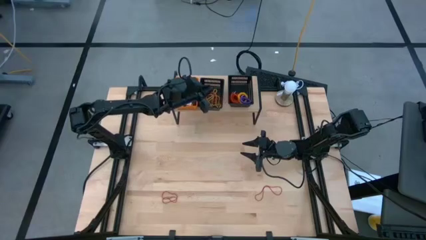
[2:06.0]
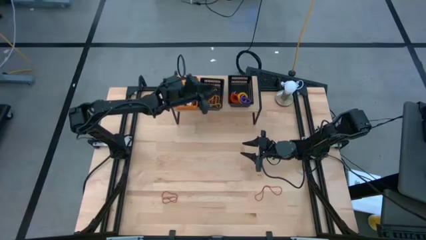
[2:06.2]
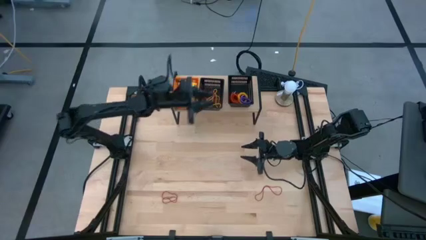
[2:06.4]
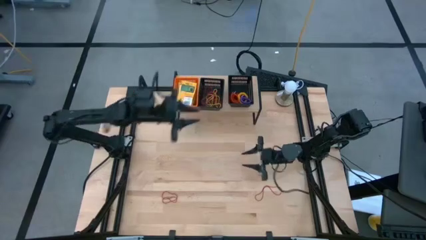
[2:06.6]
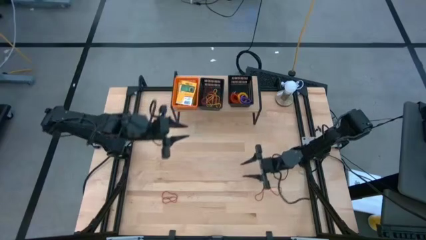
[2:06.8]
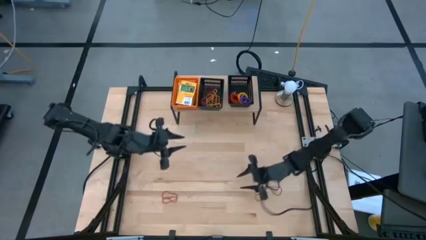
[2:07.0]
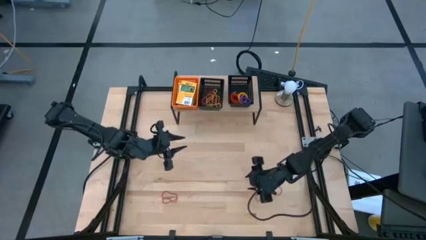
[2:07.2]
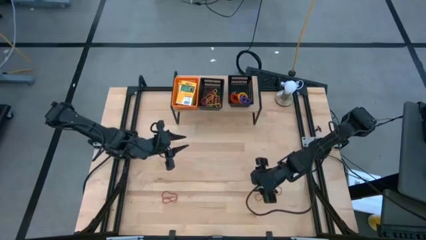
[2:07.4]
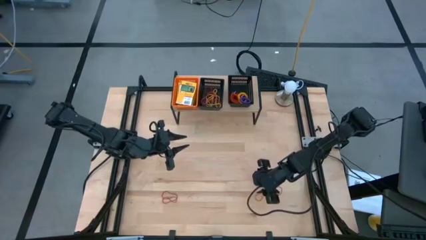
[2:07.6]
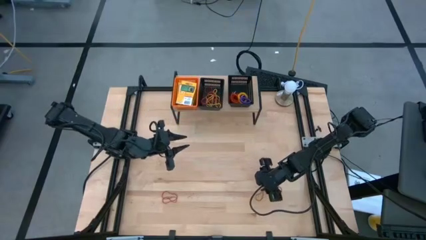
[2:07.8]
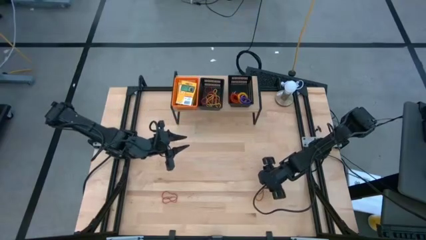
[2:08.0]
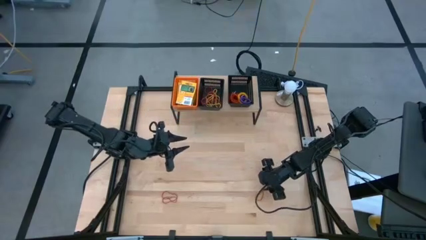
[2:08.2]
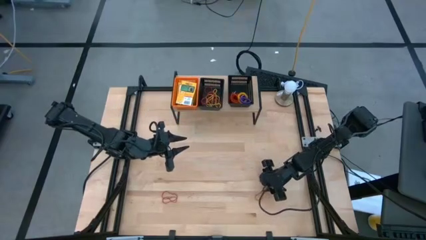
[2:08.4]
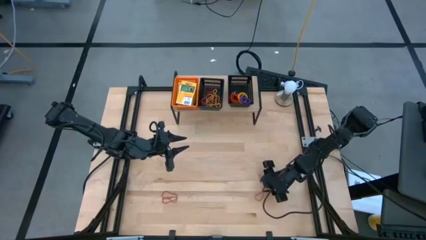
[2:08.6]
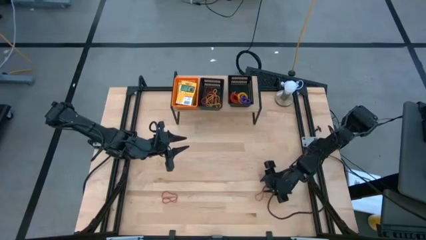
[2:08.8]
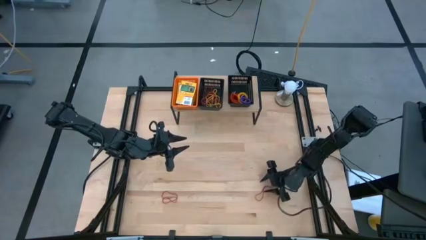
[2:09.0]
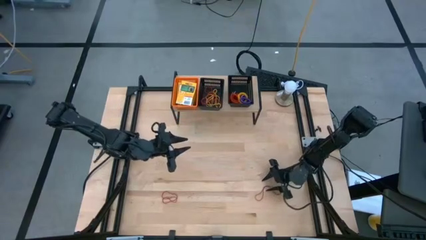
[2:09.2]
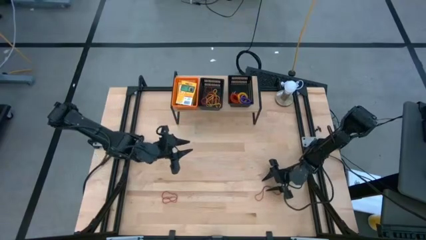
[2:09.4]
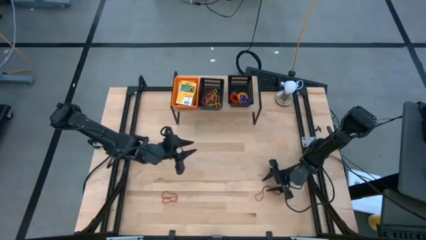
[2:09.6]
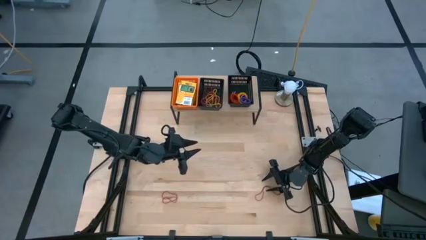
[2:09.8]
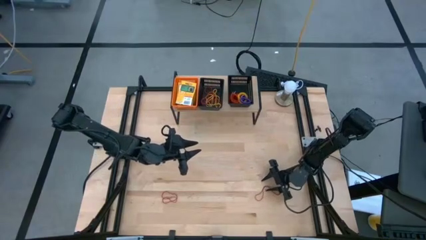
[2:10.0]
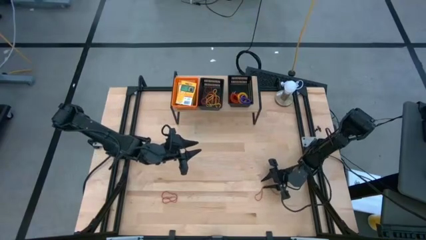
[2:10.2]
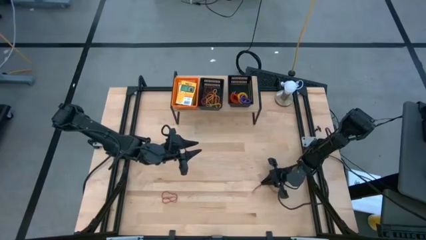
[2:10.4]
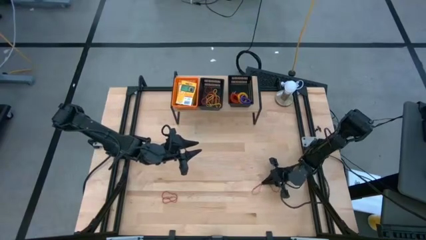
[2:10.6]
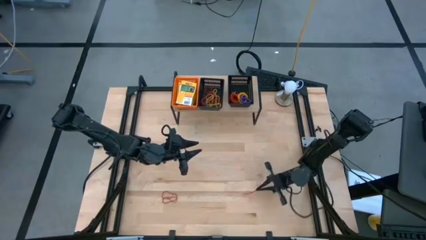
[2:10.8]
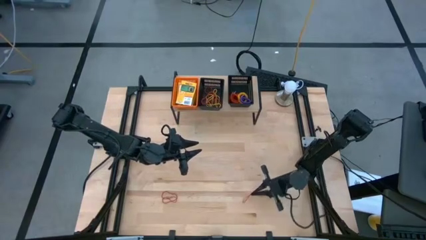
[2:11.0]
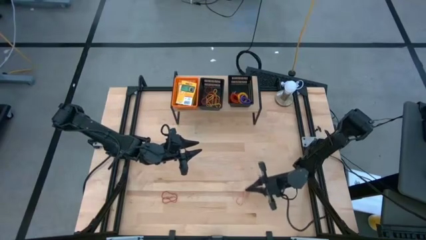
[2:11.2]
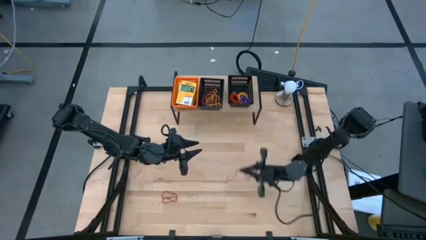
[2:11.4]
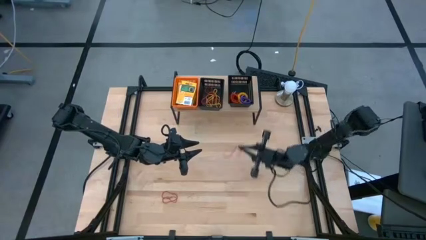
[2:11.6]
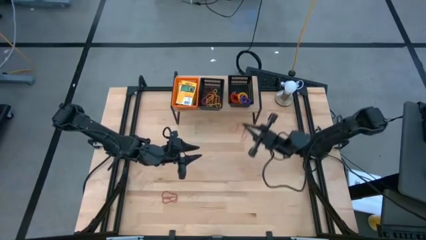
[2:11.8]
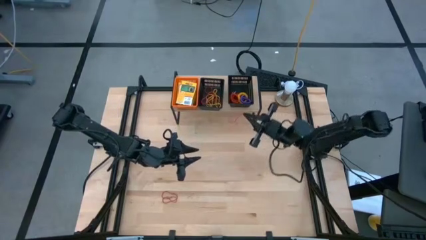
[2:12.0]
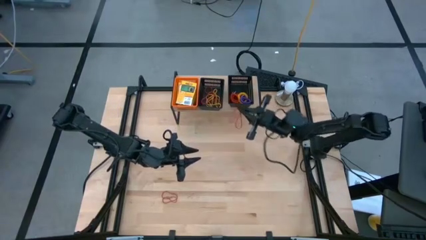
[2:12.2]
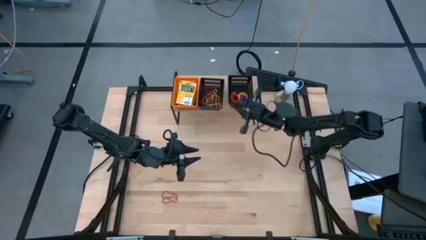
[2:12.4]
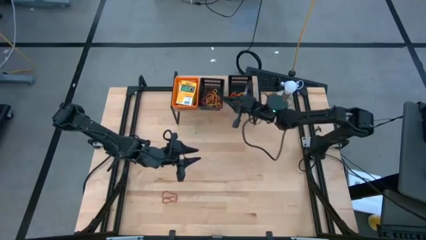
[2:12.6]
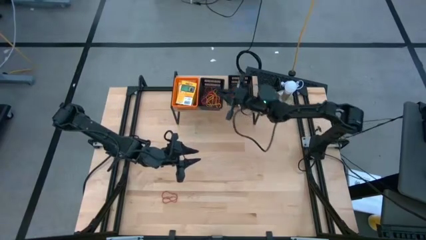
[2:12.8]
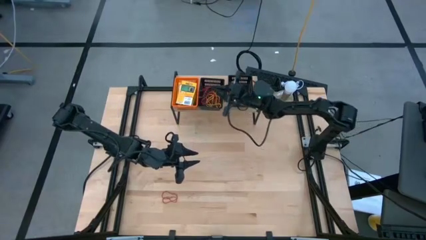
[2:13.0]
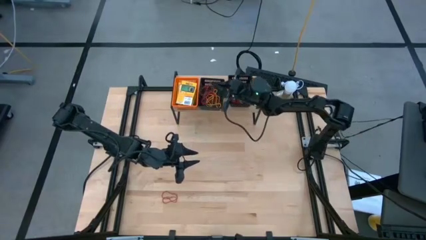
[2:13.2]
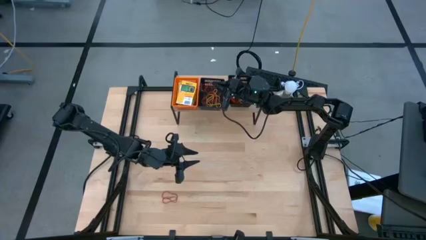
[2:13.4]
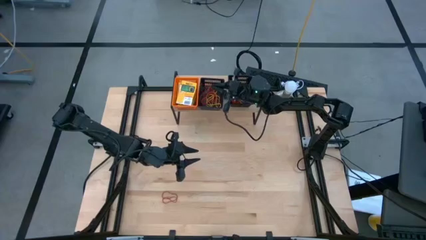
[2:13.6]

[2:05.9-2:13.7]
Task: Pick & Place Office Desk Supplies
Put the red rubber band into the left black bin on the shelf

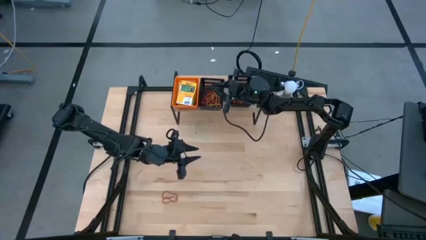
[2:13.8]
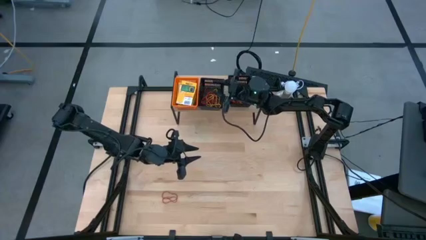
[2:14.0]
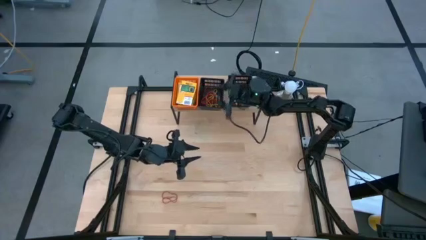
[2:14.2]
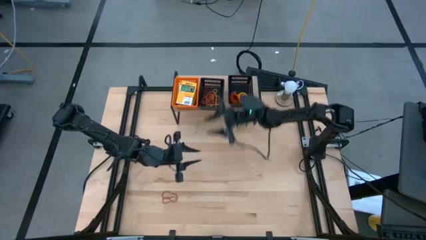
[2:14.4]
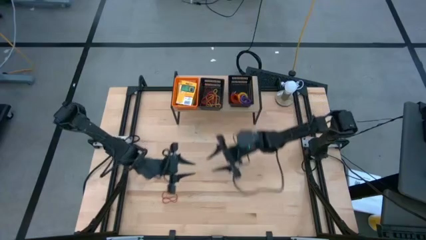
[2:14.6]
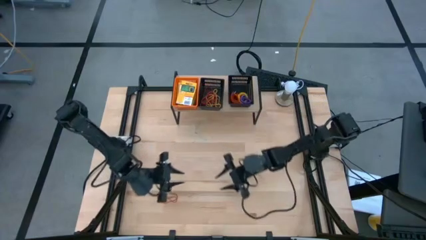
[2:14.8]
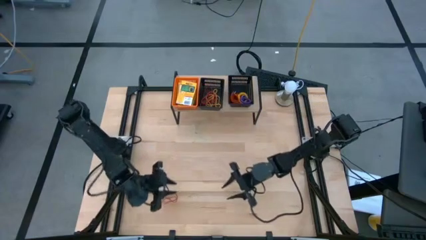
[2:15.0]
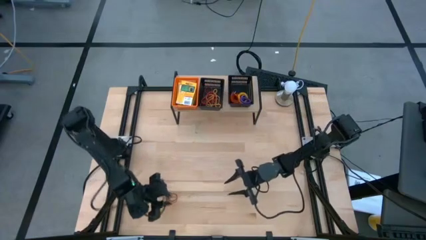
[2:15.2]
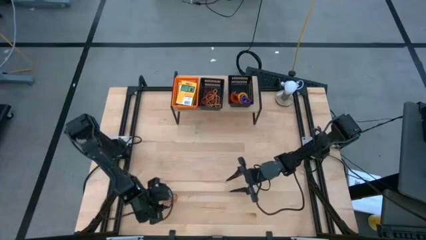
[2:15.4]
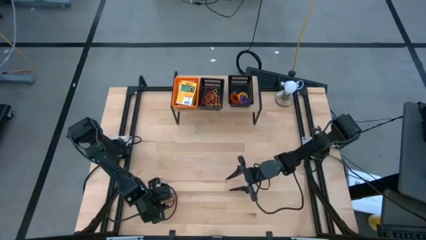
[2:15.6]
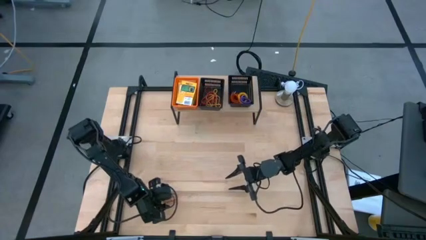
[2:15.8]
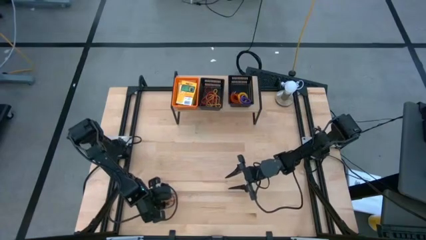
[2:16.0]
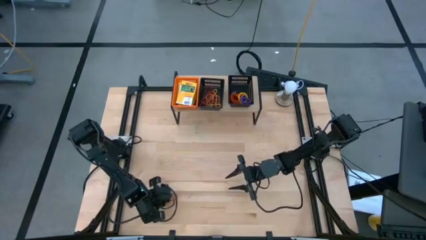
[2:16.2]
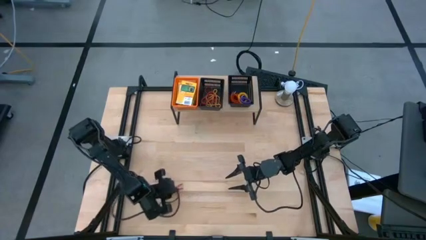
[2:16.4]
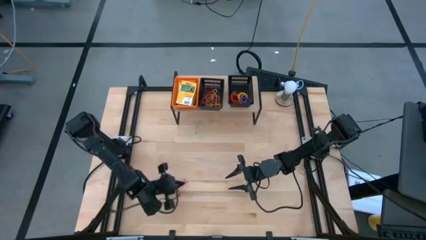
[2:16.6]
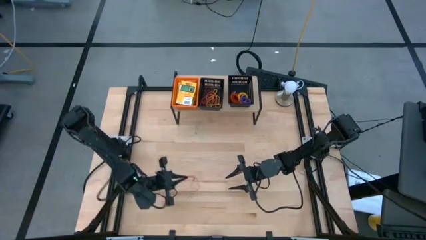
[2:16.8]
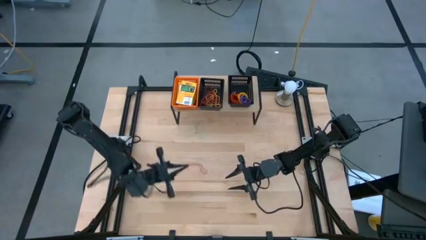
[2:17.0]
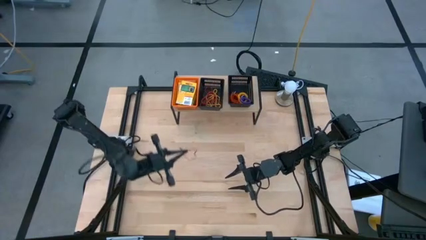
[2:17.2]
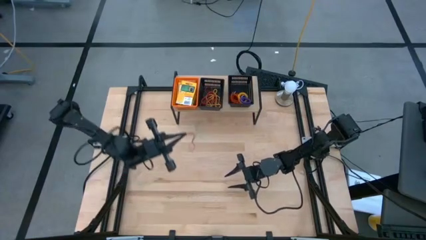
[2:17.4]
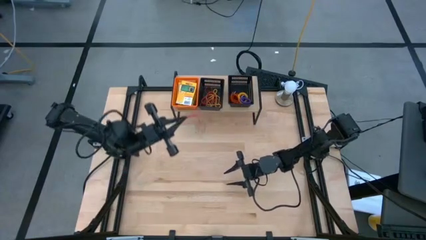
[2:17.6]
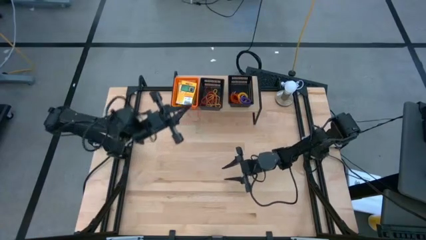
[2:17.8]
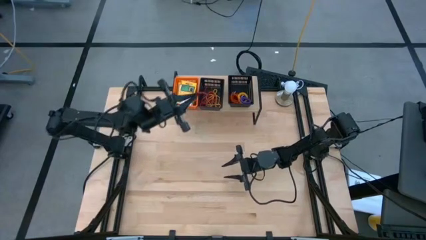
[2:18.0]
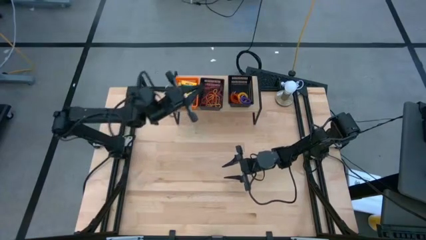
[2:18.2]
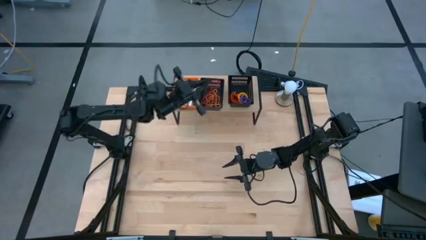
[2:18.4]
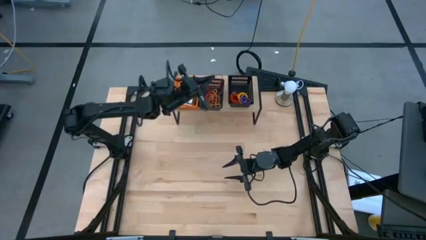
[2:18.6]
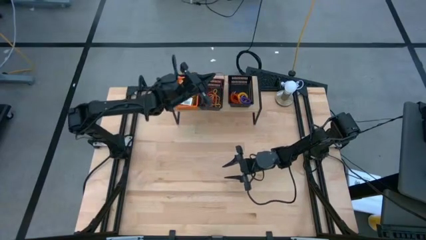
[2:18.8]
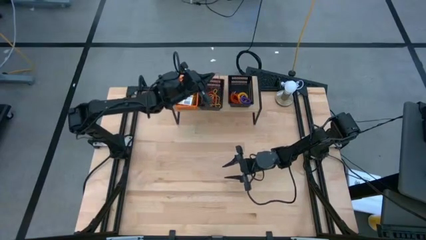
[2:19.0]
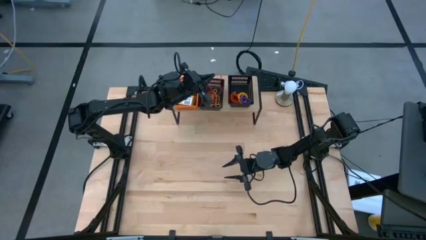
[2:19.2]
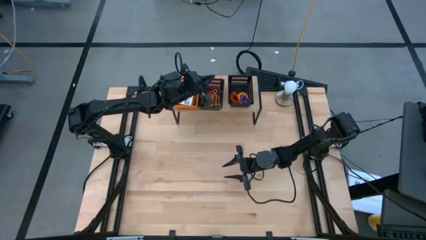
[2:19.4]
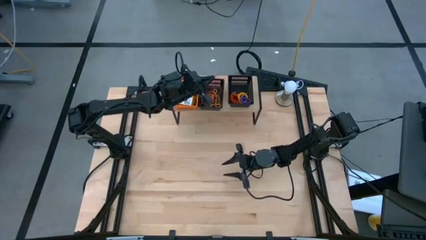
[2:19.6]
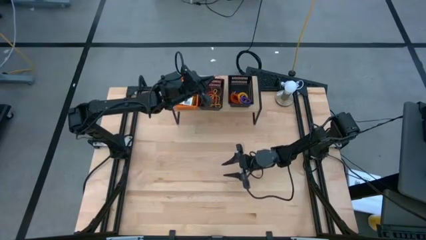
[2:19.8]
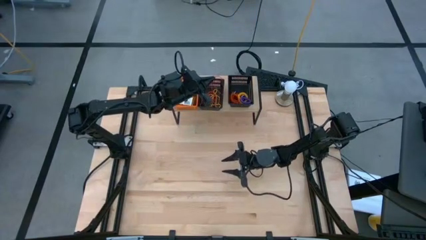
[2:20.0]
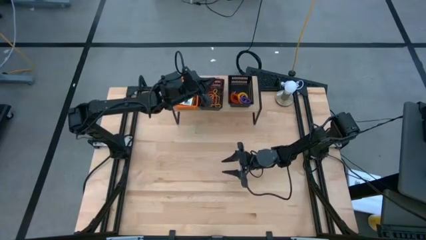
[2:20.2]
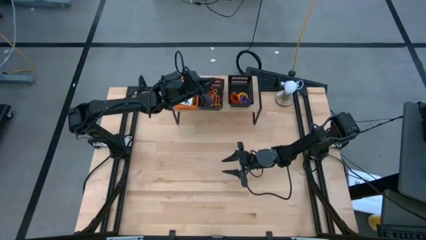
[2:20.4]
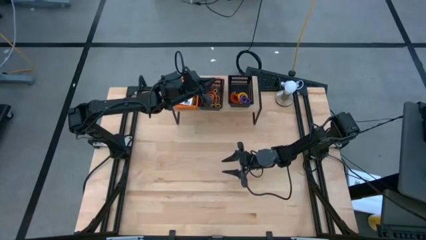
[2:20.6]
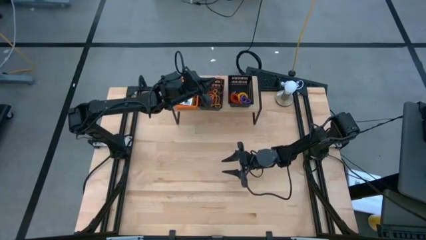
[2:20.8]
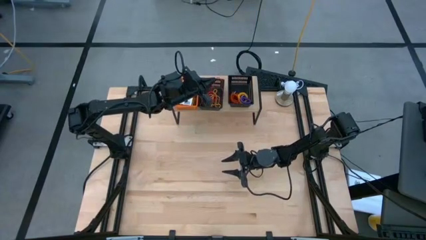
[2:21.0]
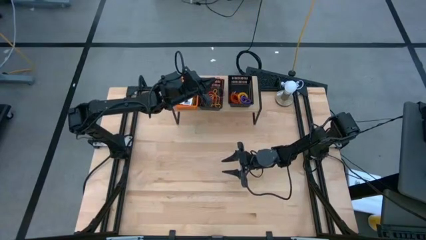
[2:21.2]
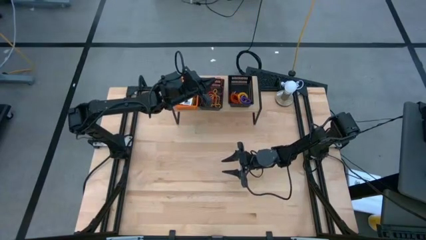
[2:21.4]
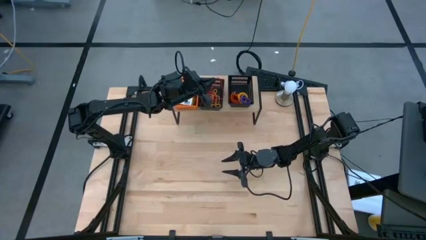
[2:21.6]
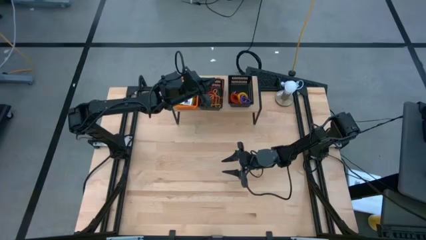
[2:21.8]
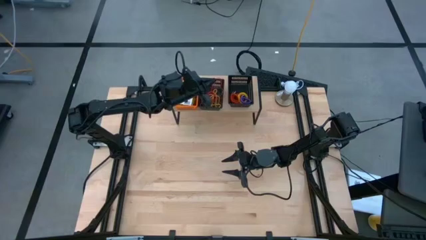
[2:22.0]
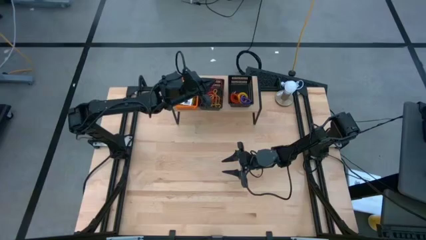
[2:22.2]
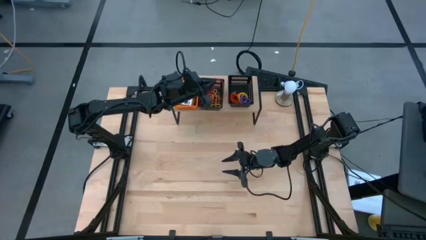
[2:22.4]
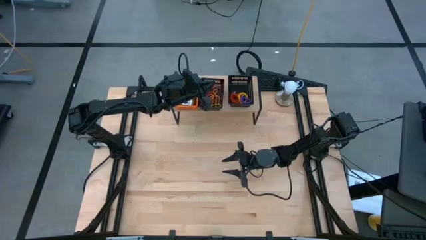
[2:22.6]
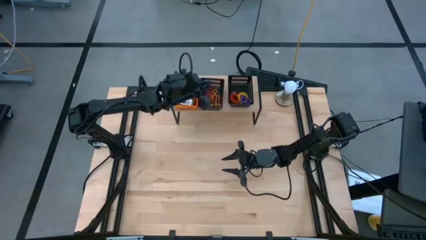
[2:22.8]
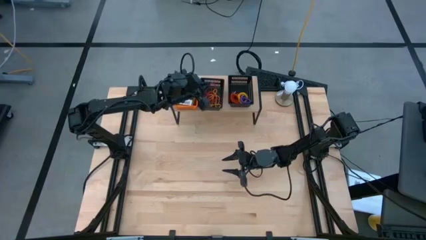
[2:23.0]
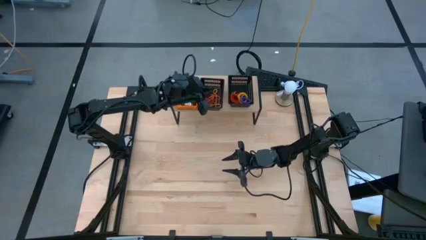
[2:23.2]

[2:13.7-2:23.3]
Put the red rubber band into the left black bin on the shelf
